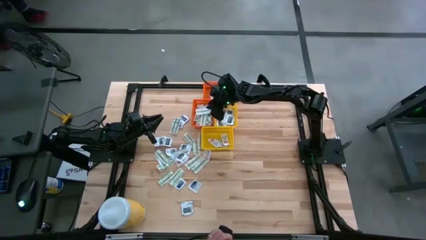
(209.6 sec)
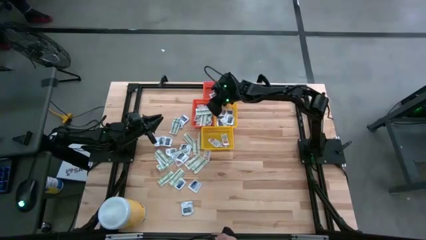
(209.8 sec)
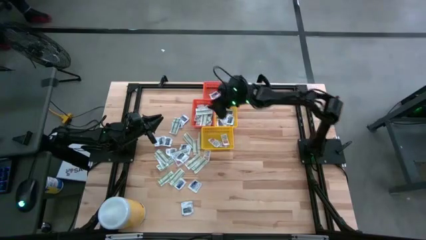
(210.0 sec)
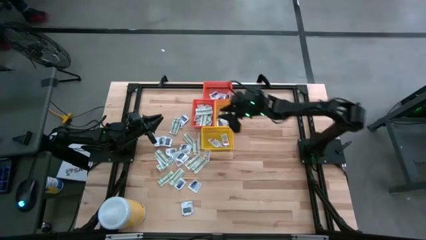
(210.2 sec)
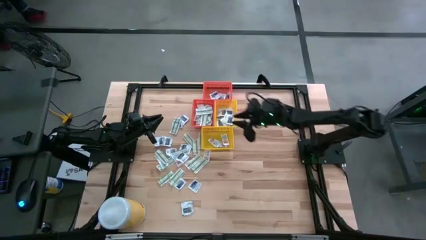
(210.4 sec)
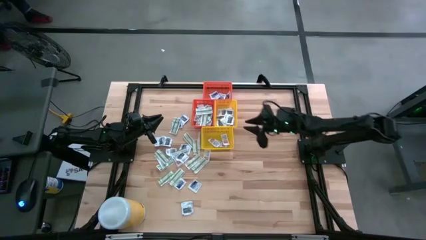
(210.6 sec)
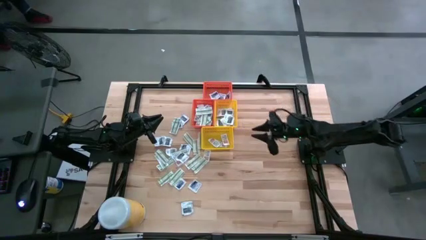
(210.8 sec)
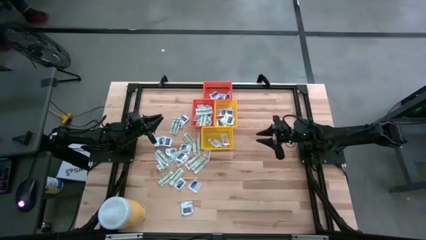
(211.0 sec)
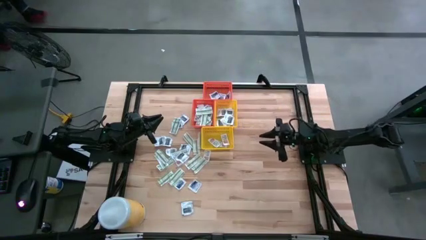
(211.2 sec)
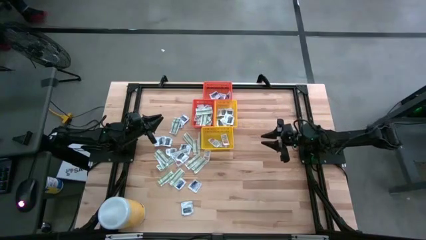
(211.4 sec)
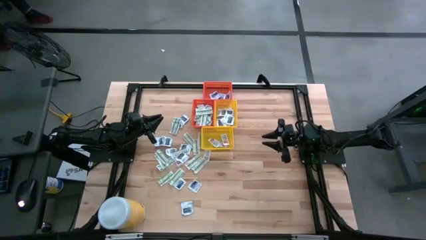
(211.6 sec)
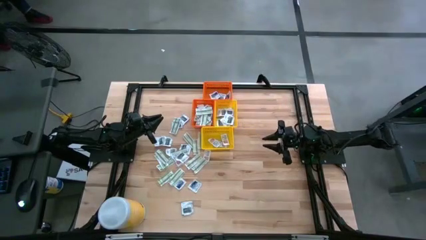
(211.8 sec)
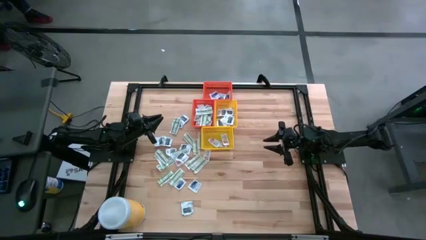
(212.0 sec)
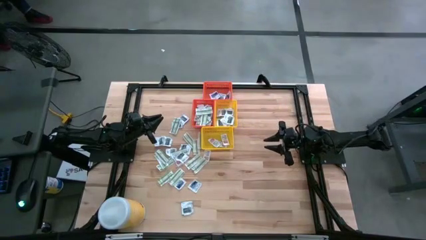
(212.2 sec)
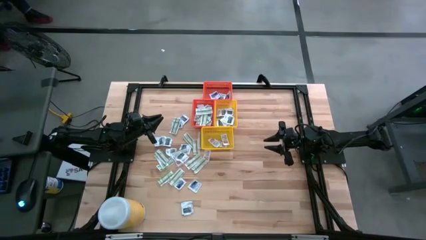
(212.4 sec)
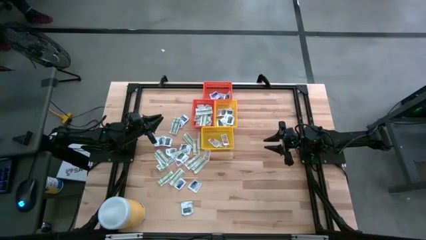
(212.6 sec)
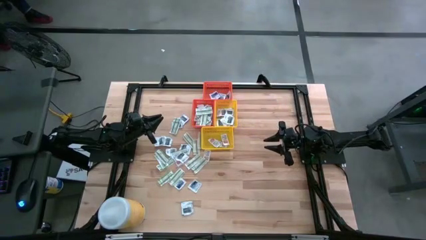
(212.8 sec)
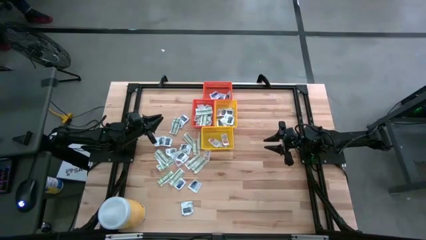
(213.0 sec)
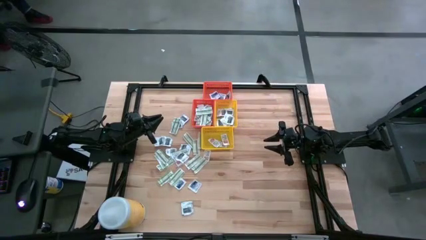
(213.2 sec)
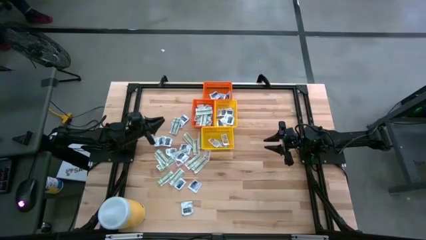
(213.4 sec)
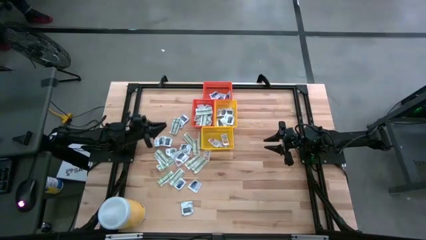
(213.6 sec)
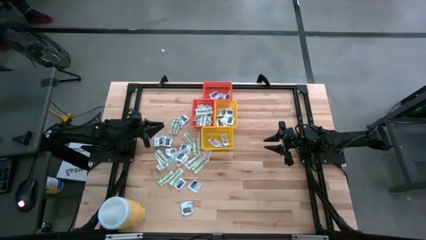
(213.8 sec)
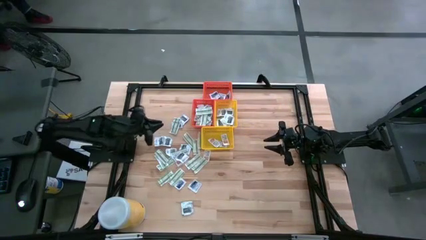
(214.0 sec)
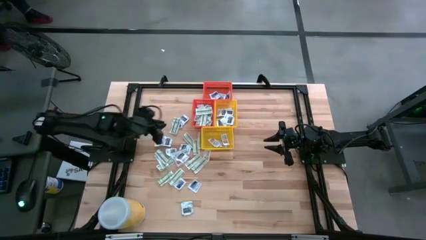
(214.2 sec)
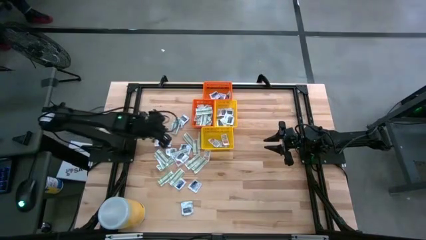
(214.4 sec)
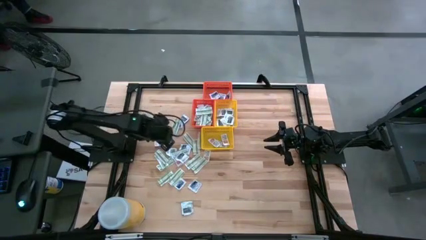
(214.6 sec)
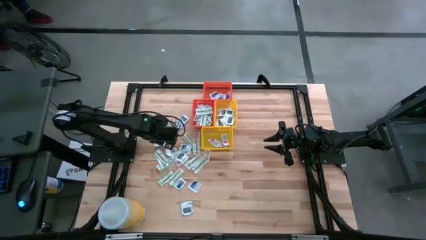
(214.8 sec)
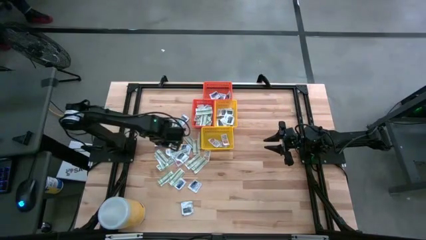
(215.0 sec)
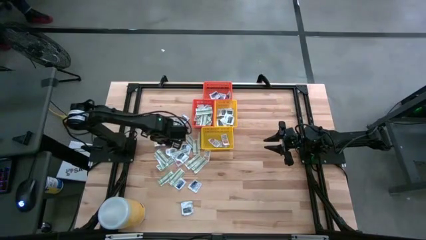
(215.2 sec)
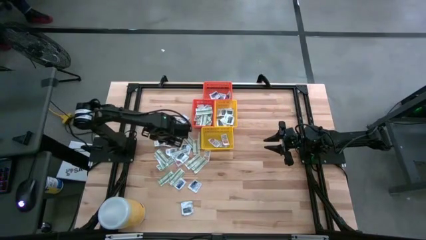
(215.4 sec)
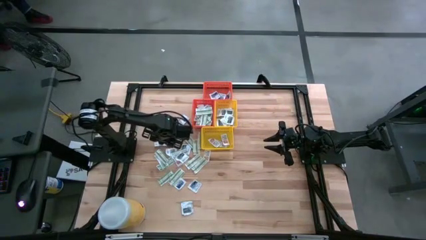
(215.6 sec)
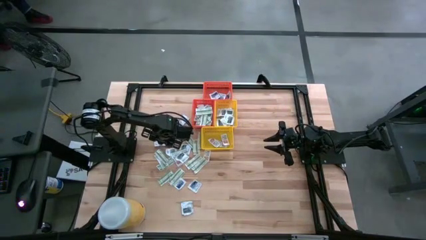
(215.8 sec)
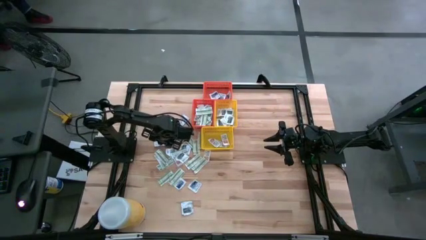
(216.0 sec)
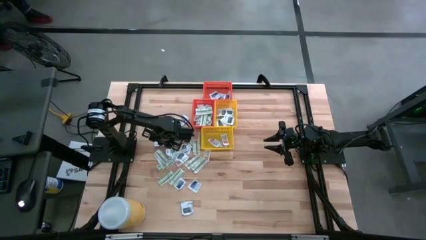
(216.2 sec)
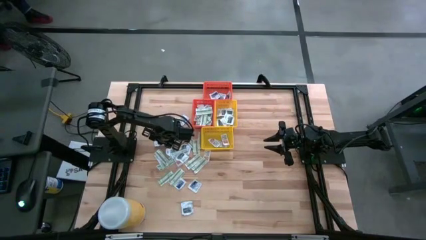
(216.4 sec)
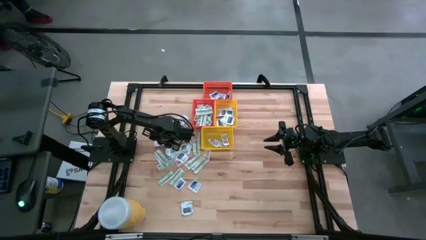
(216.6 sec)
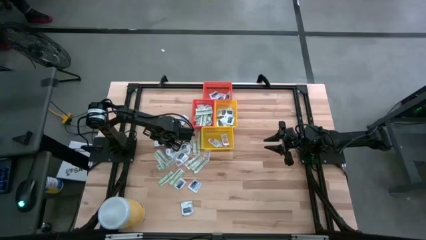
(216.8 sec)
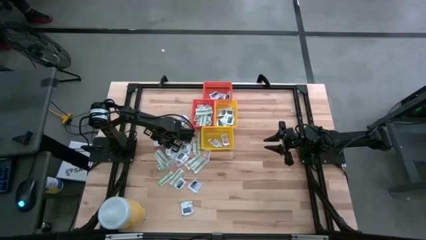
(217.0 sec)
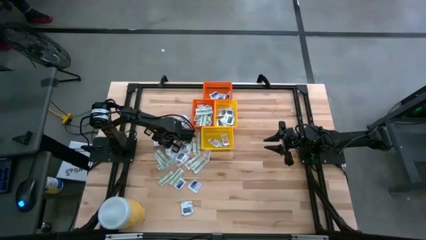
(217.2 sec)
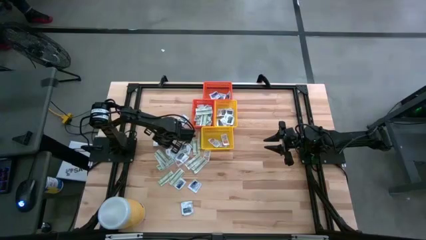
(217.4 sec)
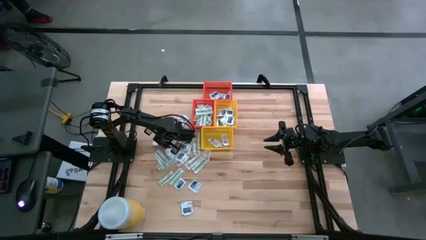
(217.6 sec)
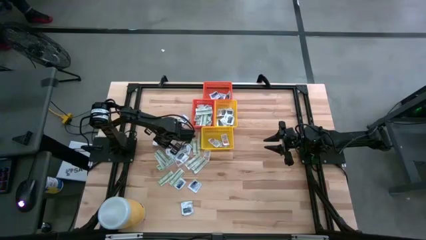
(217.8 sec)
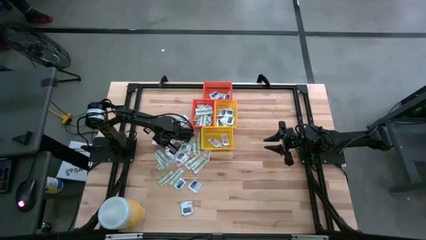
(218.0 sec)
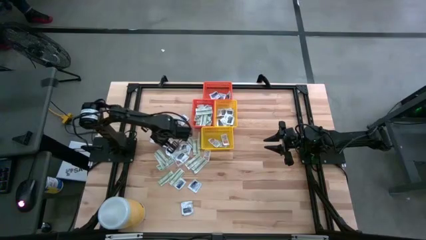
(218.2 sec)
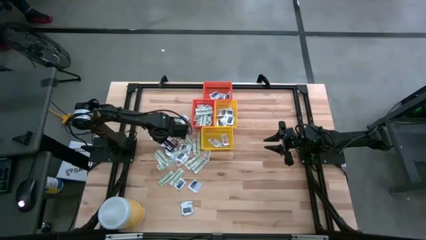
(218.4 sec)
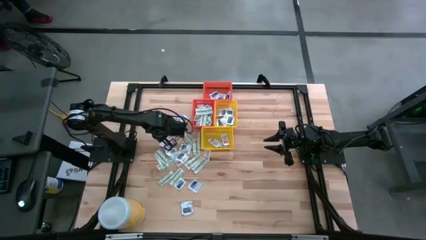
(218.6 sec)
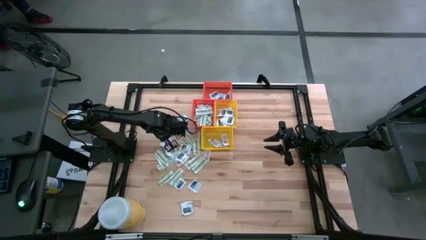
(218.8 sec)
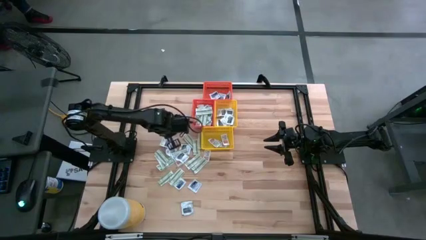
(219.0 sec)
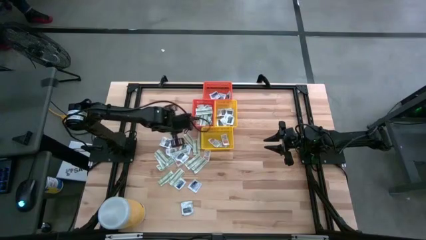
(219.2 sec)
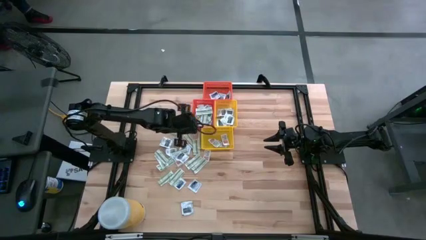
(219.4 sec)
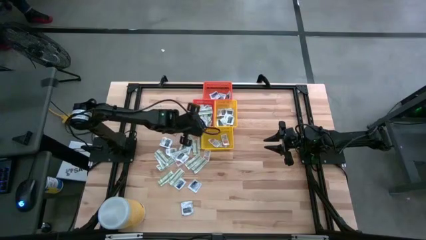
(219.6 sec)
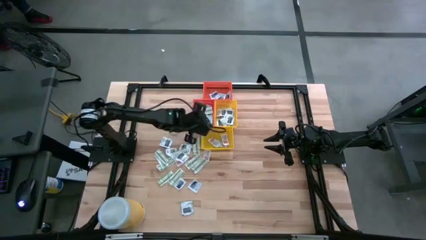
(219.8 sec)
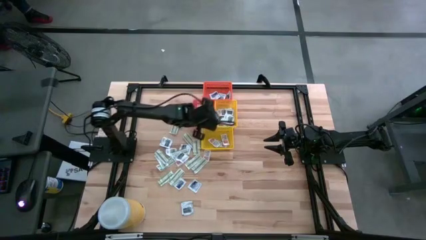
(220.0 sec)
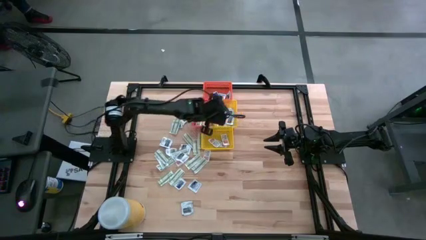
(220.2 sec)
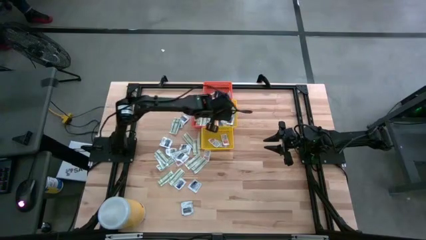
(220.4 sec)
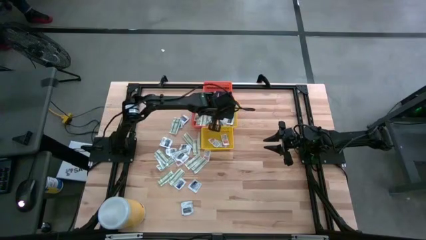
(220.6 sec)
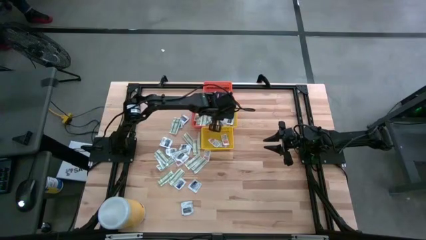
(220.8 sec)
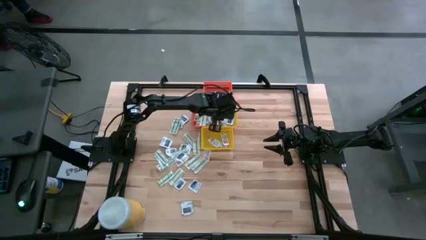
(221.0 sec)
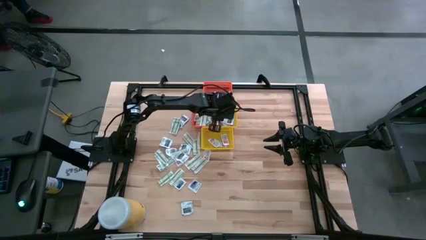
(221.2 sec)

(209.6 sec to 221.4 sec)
Task: Pick & Place First Aid Supplies
Put the towelette pack into the top yellow bin

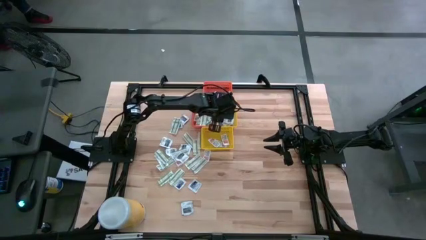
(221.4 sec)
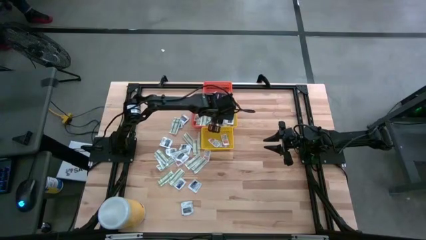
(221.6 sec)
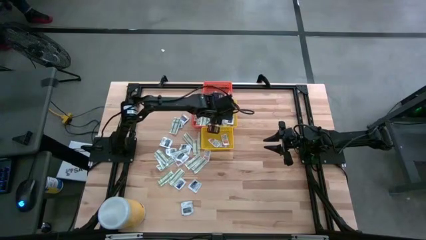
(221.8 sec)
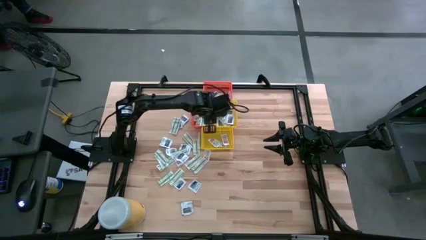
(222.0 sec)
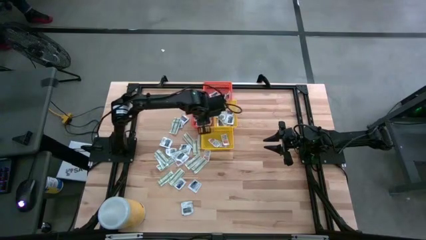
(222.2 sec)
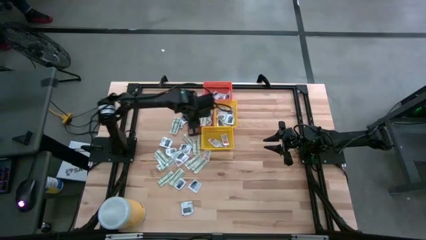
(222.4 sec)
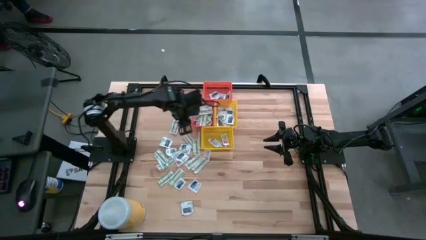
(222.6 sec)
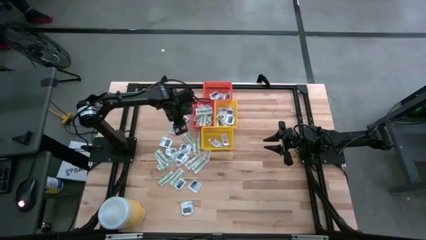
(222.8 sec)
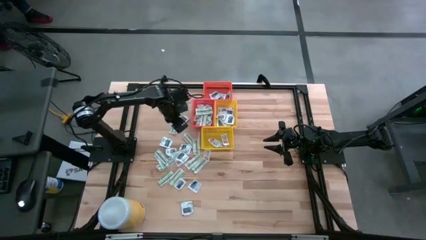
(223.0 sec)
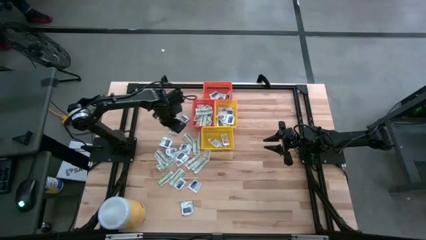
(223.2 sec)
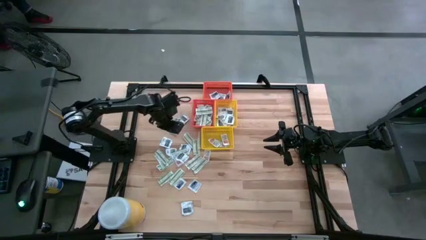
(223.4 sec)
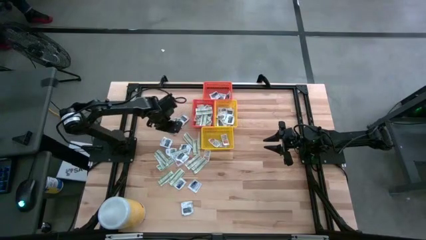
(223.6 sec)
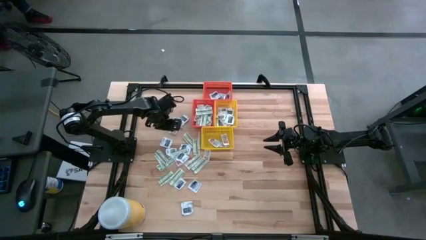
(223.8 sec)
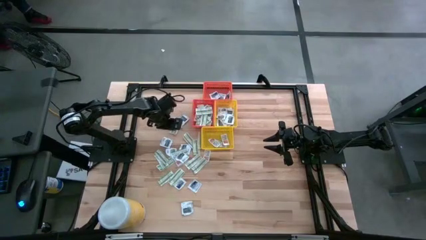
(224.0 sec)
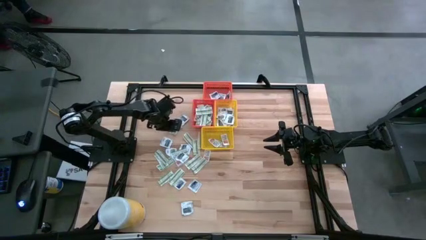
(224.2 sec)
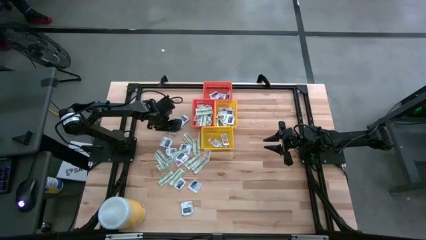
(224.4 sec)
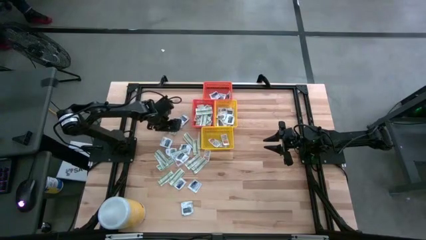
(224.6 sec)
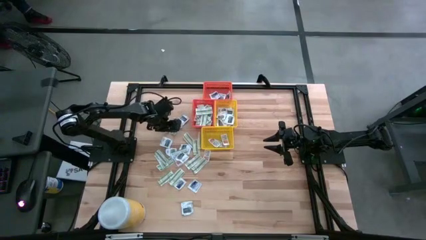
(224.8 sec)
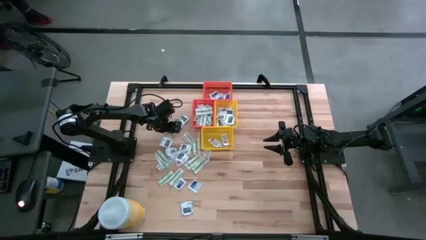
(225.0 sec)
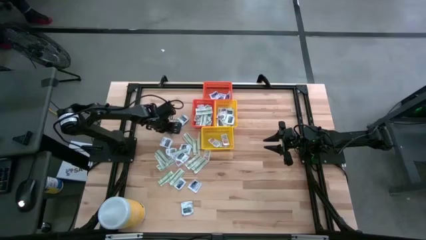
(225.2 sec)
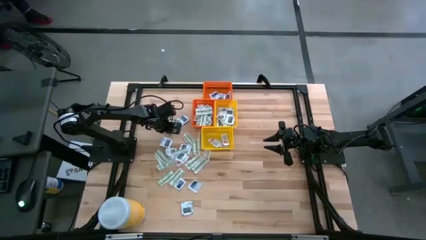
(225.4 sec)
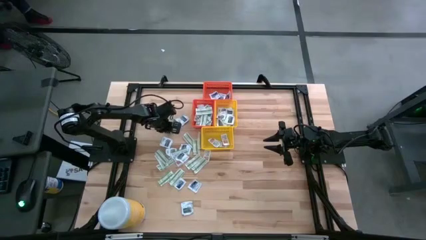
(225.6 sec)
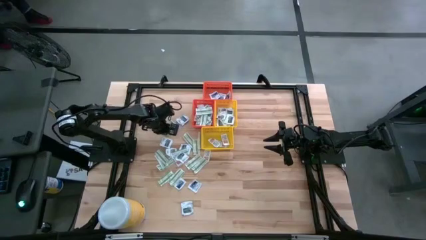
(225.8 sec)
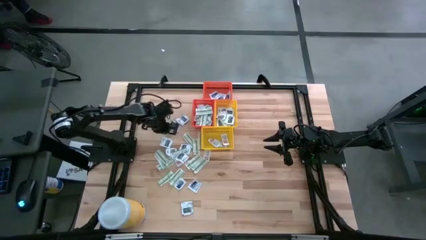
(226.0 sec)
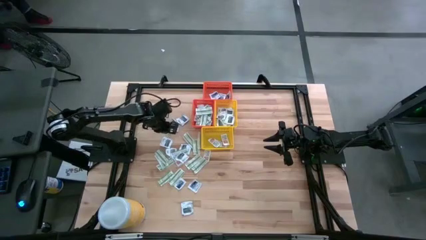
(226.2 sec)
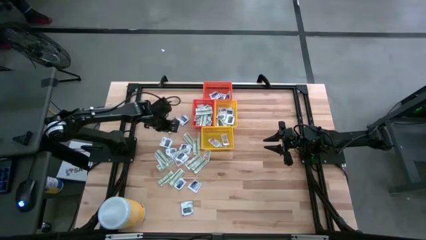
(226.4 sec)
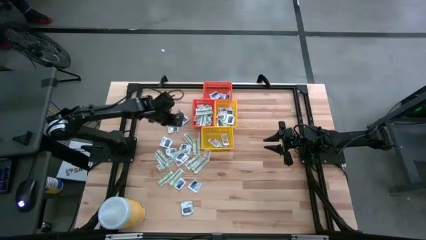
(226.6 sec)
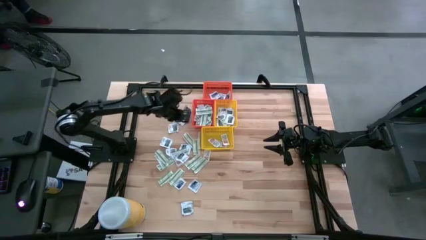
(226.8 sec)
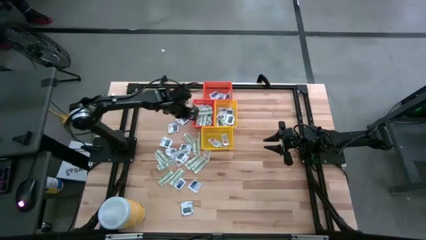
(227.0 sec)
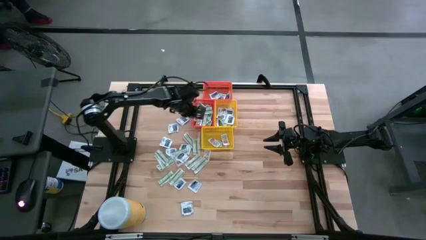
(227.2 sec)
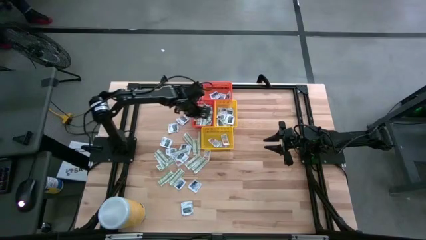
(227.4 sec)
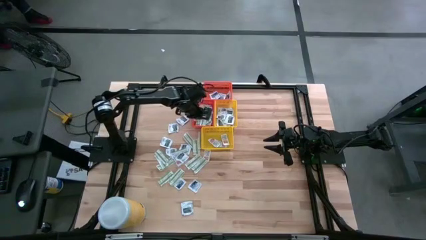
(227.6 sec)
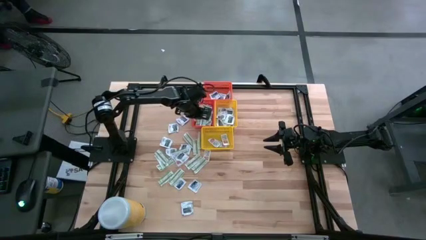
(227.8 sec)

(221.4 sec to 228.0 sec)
Put the bandage into the bottom orange bin
